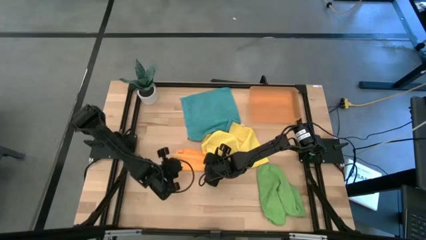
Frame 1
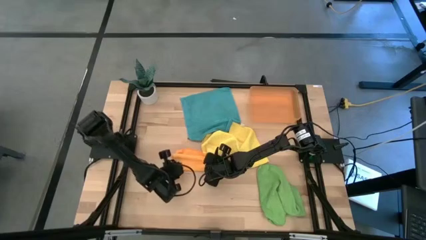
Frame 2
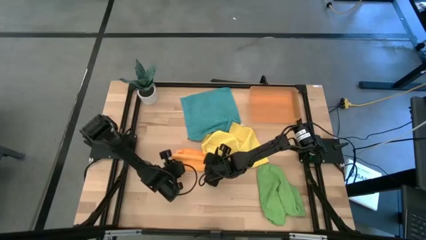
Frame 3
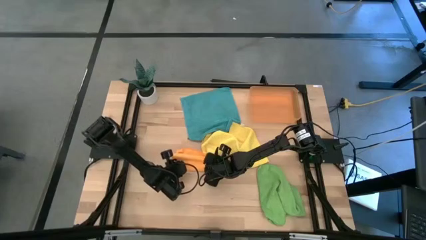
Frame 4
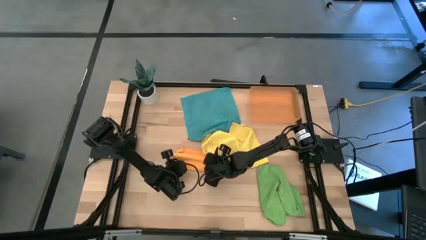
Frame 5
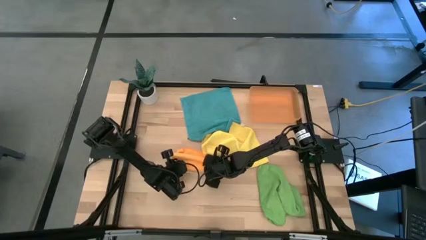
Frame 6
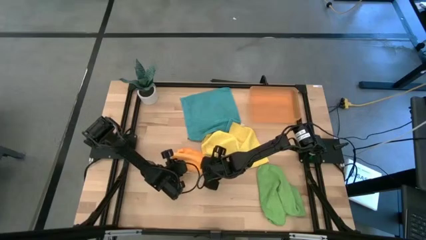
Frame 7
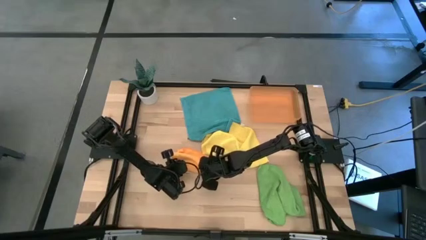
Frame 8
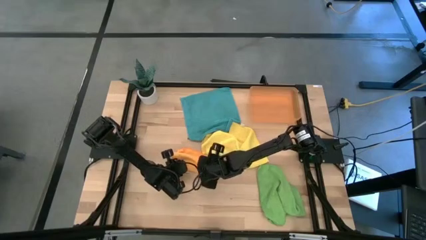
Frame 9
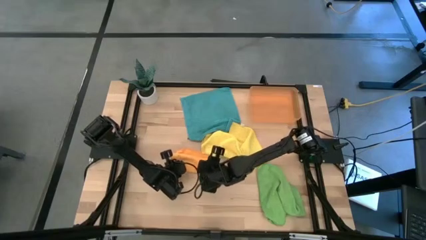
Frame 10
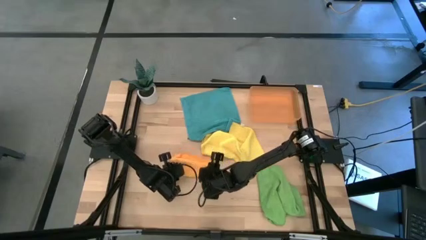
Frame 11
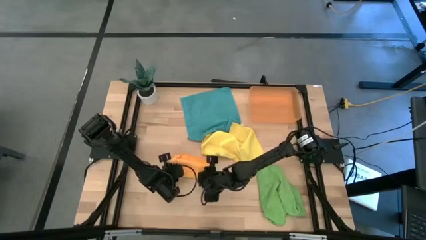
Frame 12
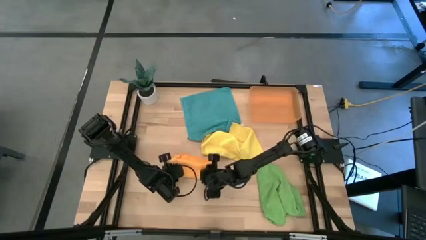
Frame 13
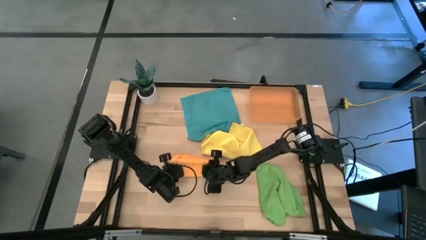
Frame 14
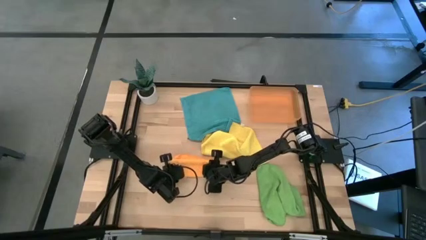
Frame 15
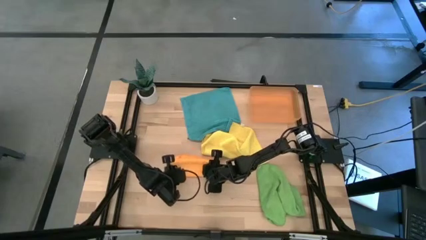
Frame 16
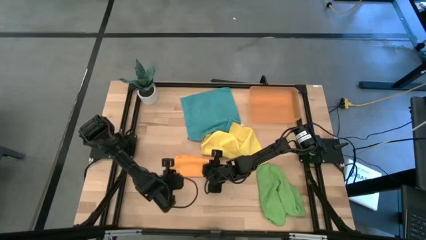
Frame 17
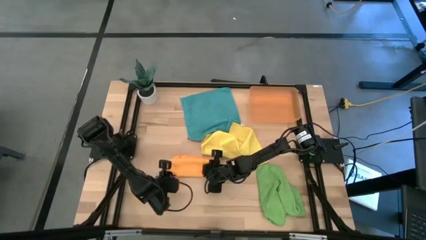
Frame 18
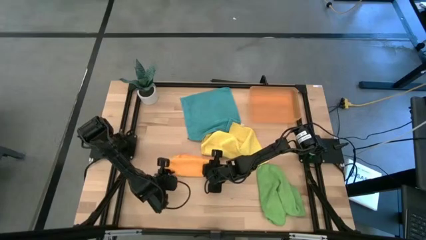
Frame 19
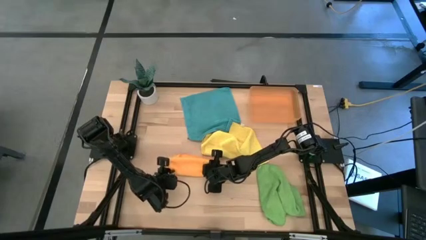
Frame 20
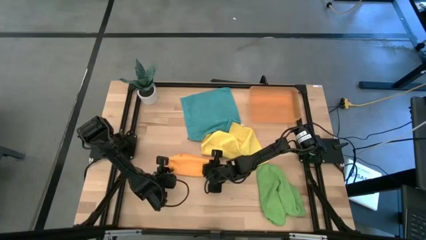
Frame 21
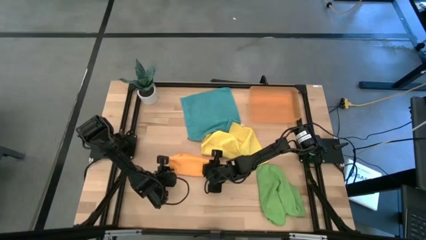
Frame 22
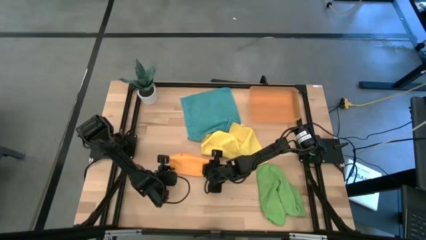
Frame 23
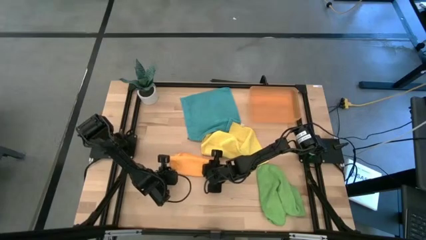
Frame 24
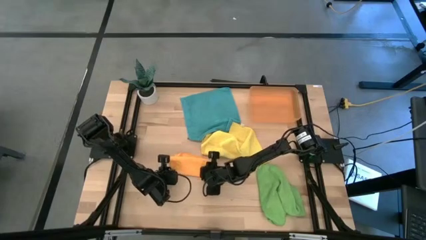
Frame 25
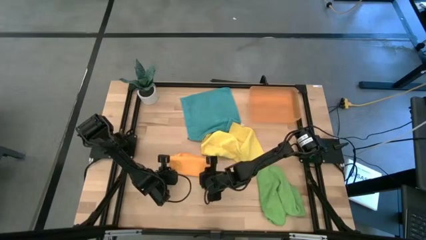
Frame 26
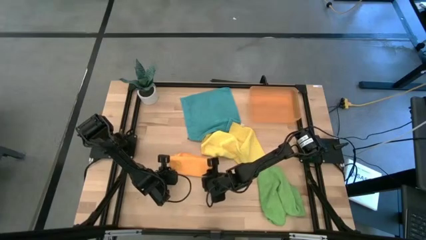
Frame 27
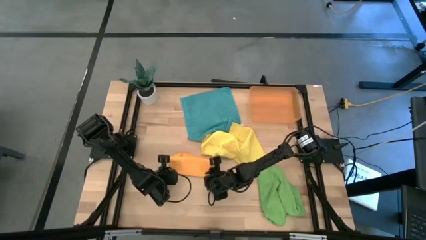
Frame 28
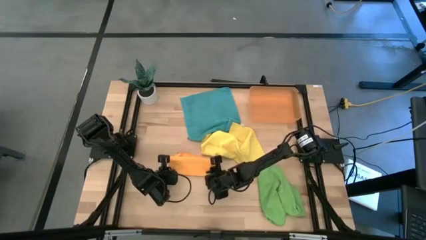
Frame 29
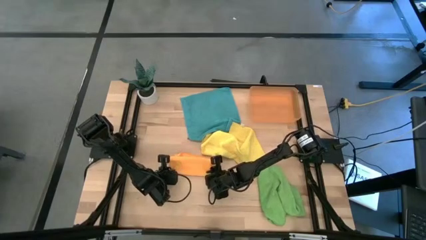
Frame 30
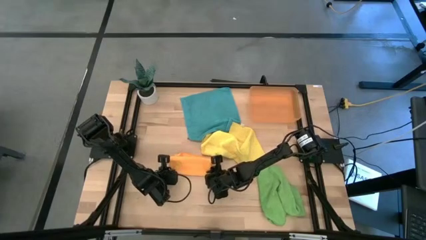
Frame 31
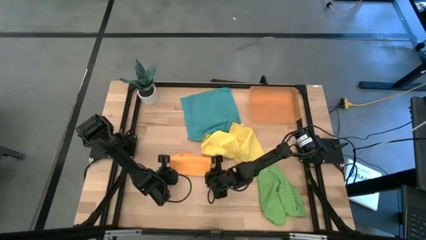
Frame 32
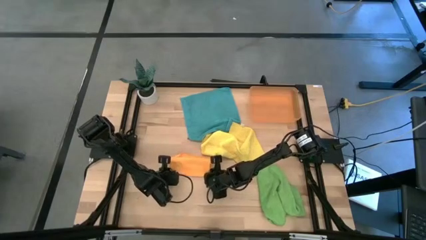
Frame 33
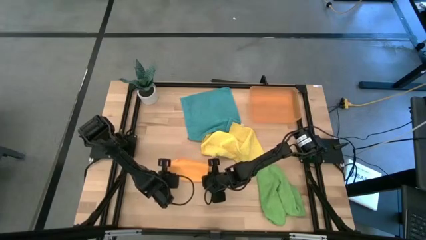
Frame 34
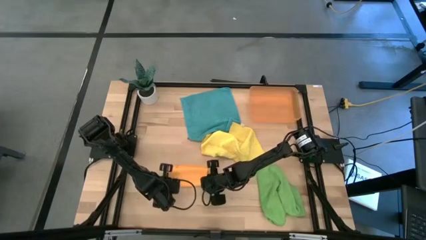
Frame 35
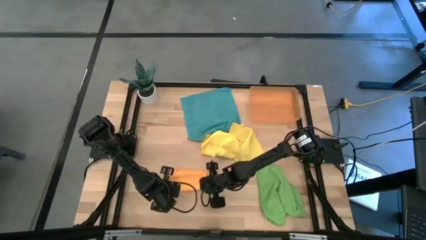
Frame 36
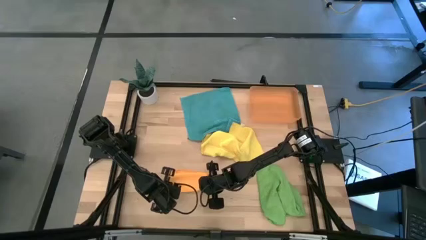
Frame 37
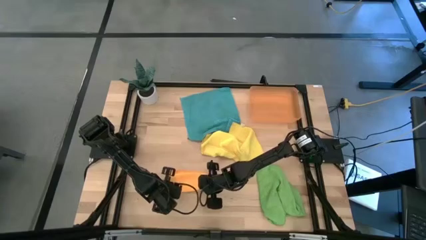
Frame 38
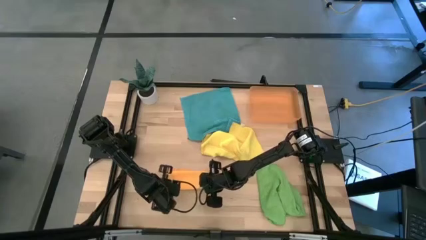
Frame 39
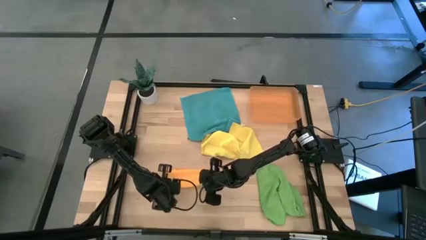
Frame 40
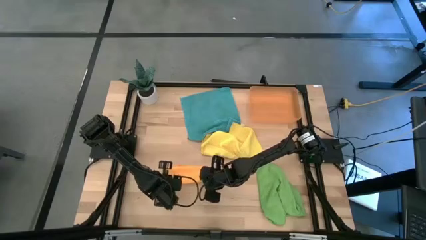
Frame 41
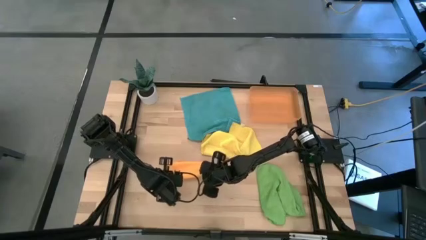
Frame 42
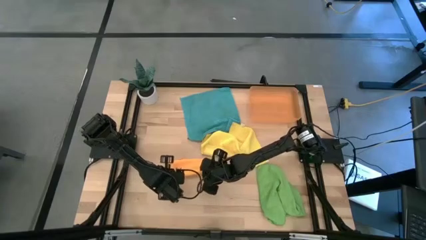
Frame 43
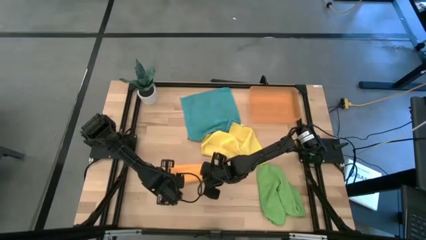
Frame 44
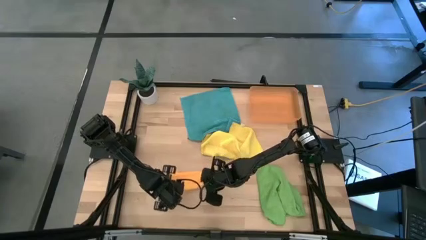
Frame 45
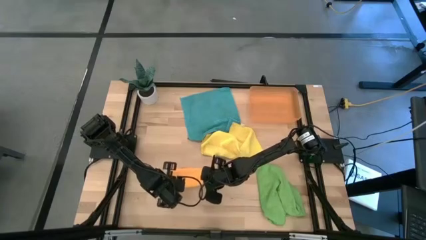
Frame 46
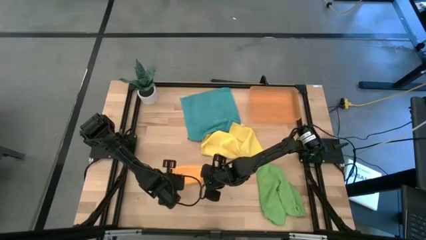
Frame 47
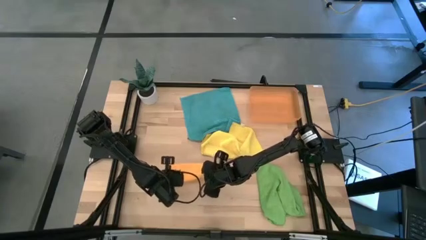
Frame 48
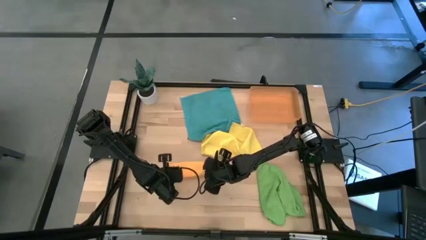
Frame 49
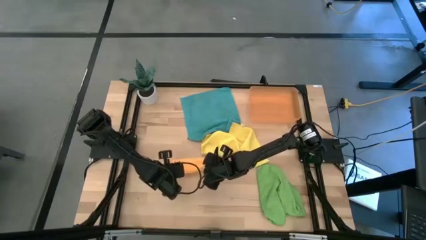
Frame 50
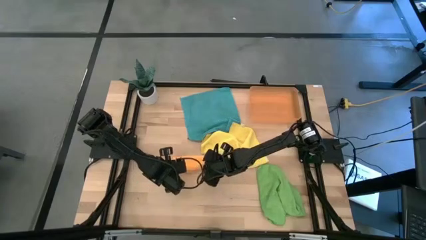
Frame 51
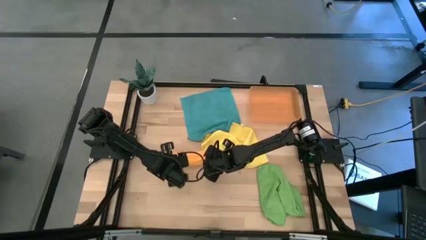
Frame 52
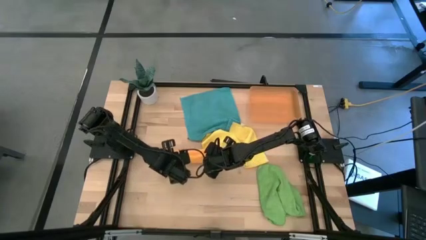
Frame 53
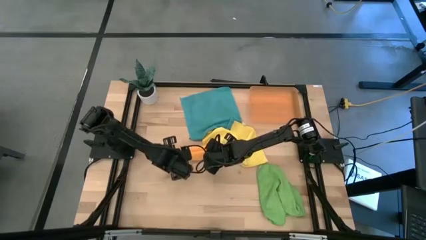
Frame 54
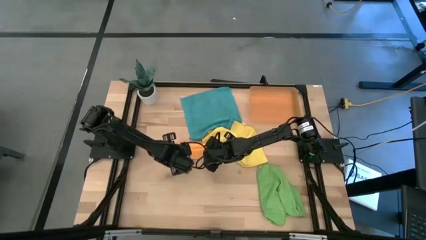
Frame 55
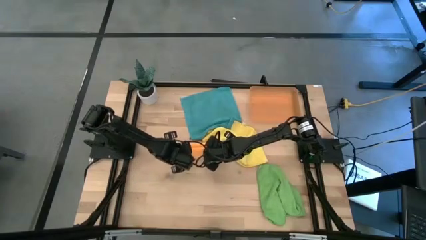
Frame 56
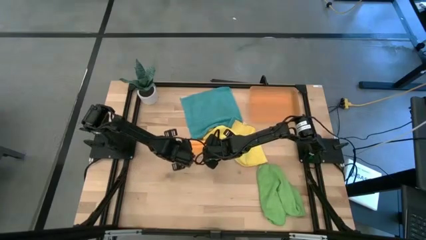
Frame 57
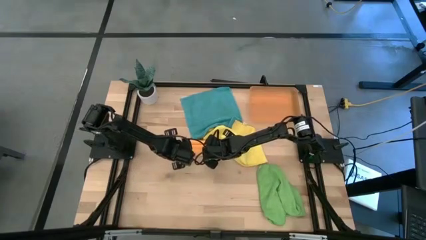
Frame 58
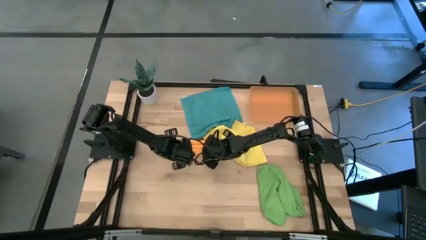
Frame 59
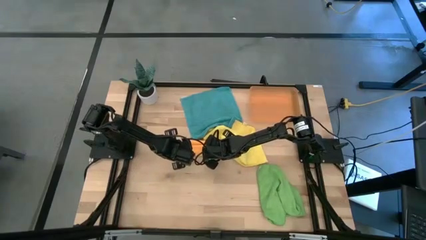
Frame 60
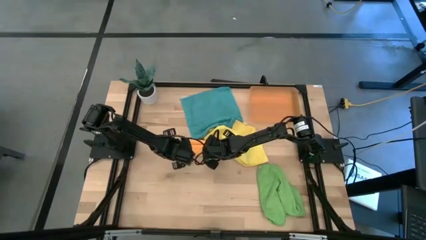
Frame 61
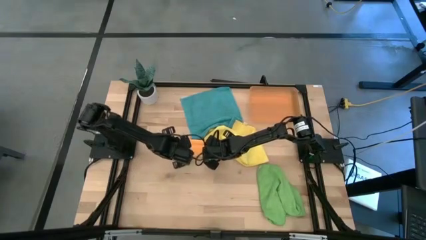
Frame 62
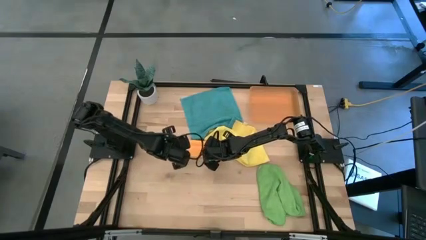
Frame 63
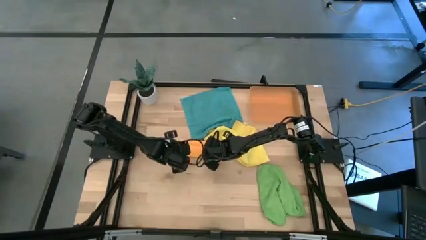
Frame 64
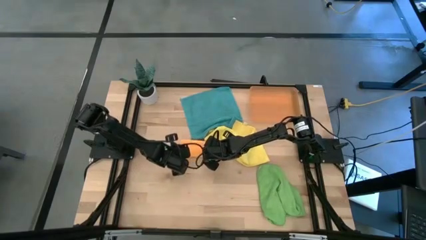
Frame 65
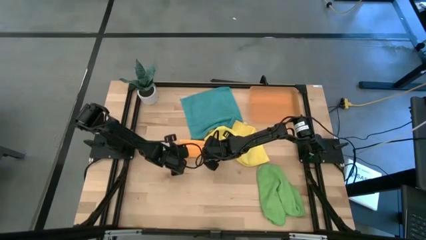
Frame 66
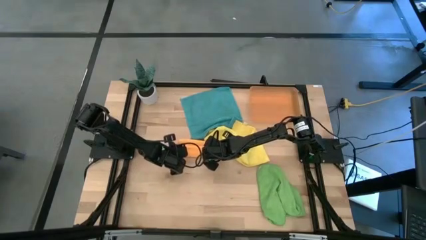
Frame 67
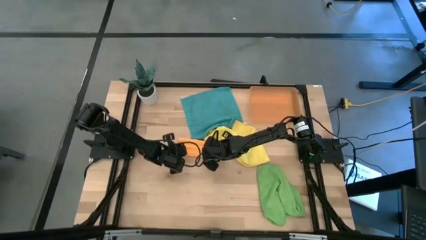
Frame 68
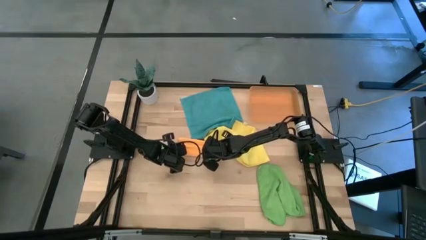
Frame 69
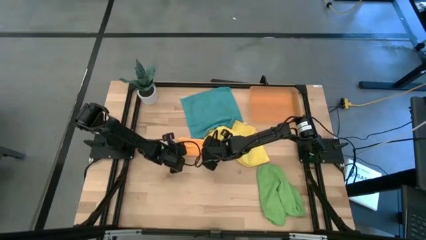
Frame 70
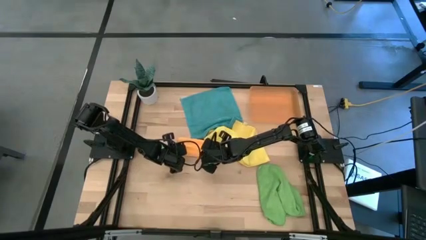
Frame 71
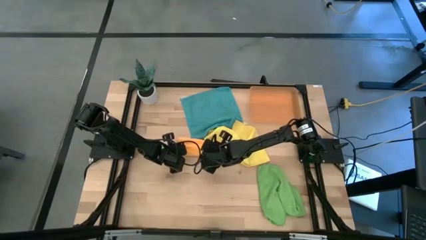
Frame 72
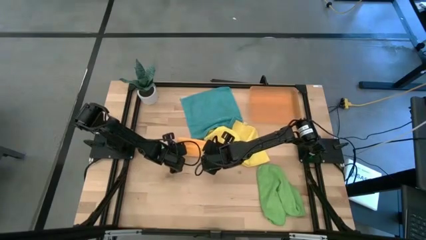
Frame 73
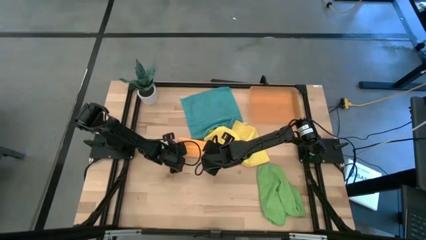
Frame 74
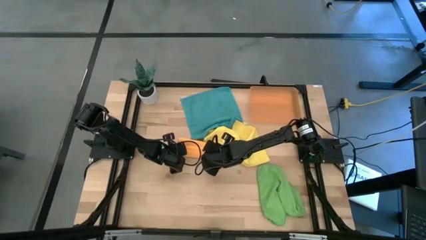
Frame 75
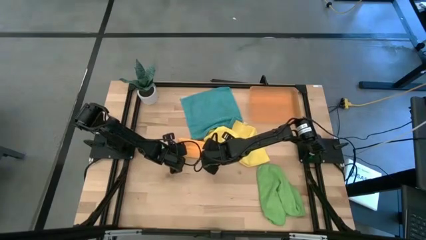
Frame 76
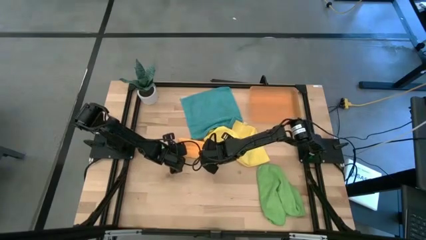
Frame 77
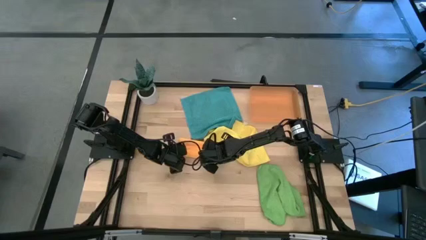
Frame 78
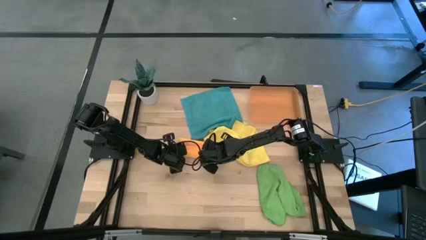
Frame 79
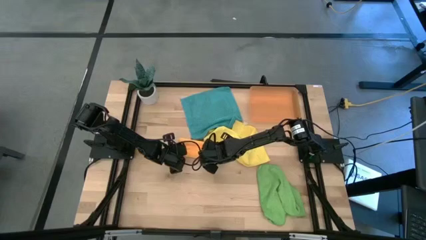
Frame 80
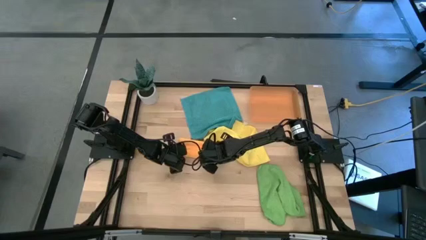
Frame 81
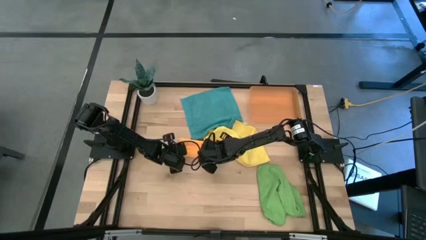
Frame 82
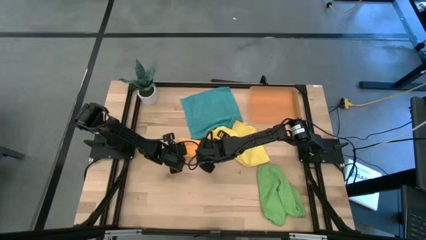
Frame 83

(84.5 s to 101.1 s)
Task: Roll microfiber towels into tight, uniform cylinder then place into a basket
Roll the orange microfiber towel
